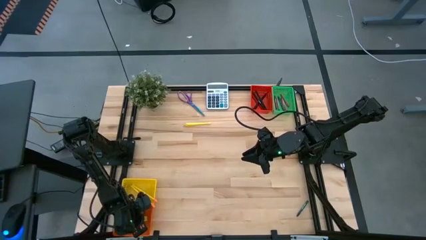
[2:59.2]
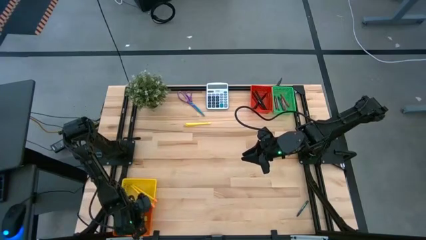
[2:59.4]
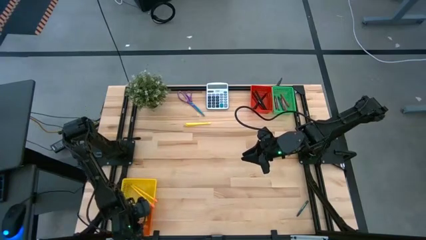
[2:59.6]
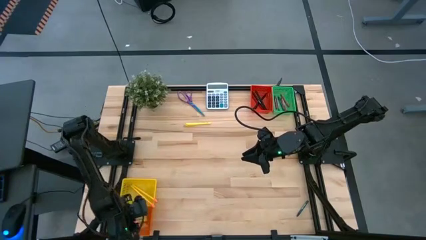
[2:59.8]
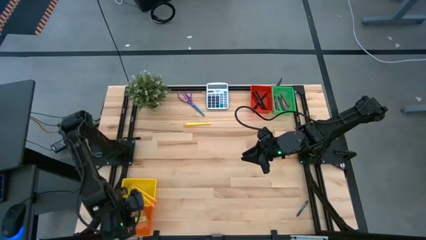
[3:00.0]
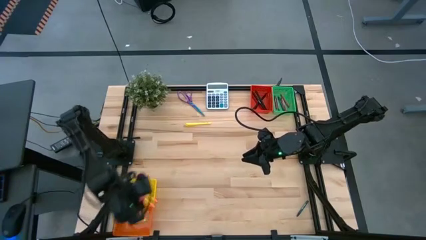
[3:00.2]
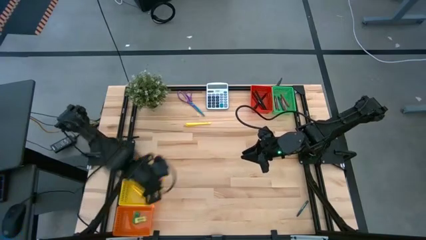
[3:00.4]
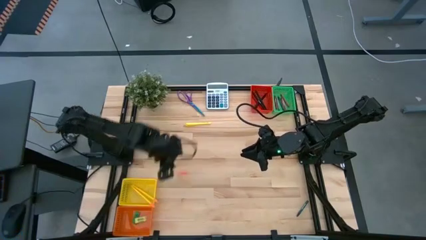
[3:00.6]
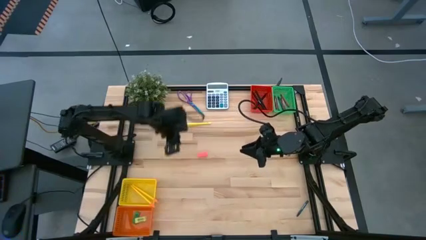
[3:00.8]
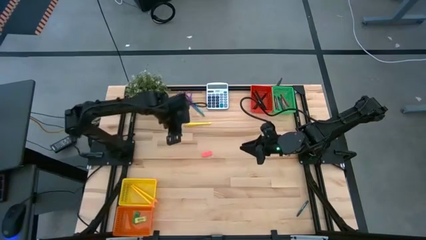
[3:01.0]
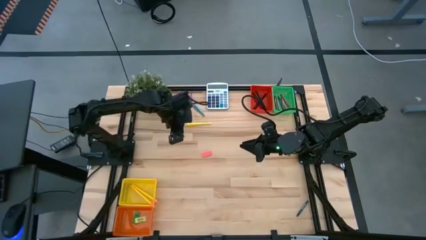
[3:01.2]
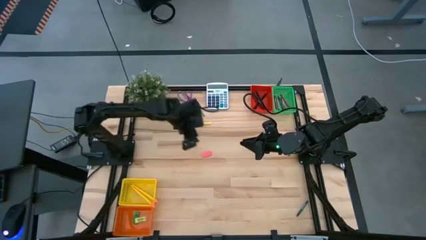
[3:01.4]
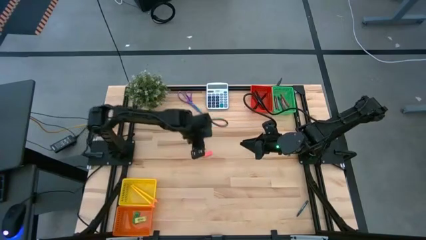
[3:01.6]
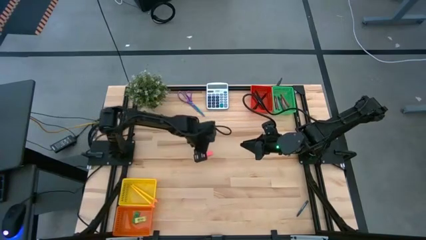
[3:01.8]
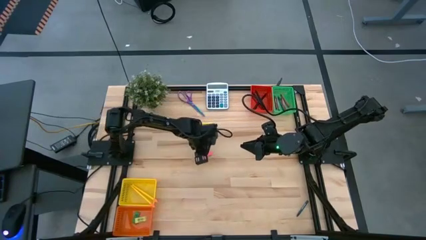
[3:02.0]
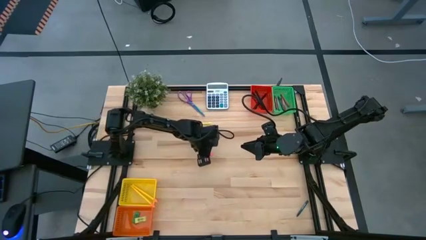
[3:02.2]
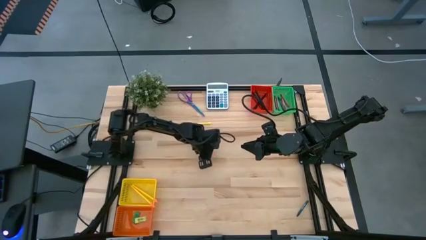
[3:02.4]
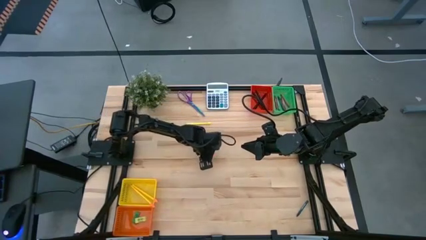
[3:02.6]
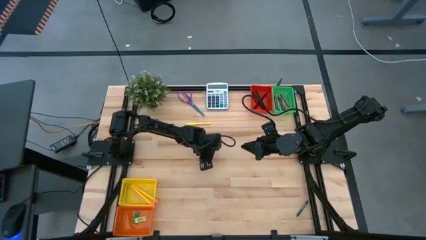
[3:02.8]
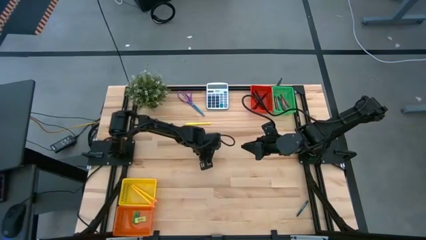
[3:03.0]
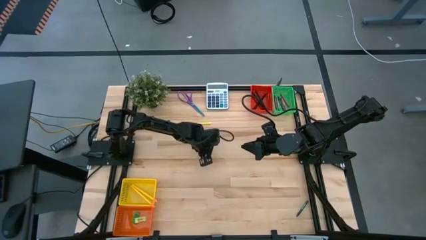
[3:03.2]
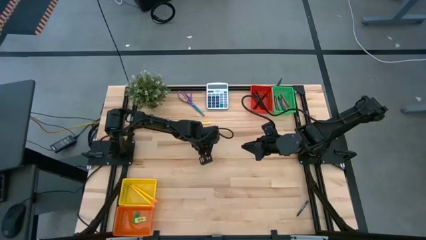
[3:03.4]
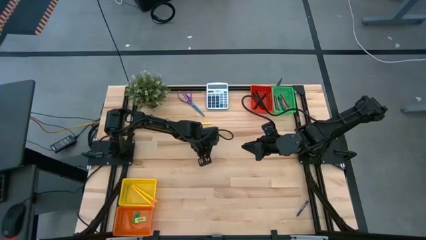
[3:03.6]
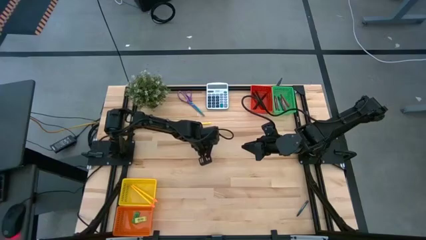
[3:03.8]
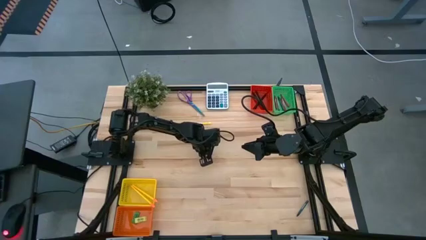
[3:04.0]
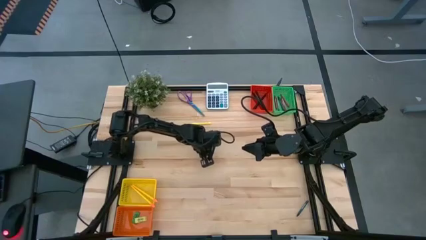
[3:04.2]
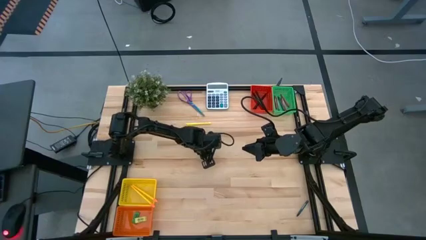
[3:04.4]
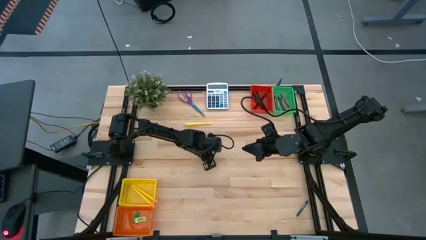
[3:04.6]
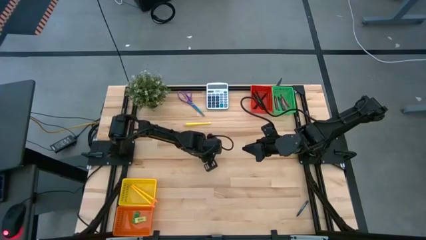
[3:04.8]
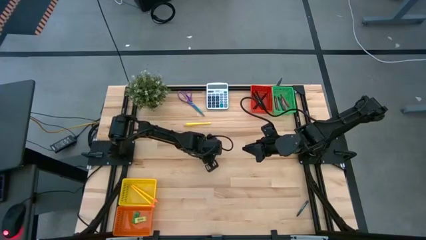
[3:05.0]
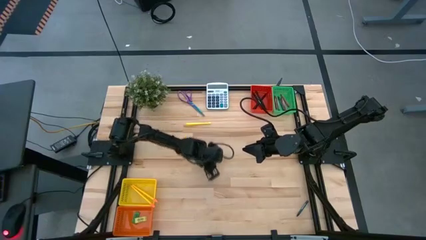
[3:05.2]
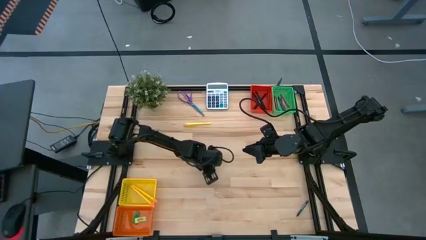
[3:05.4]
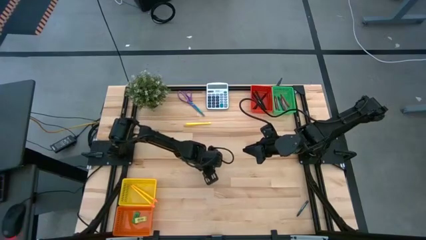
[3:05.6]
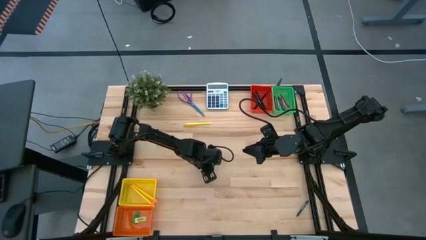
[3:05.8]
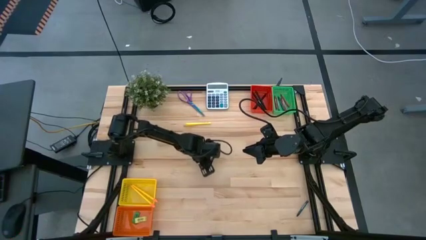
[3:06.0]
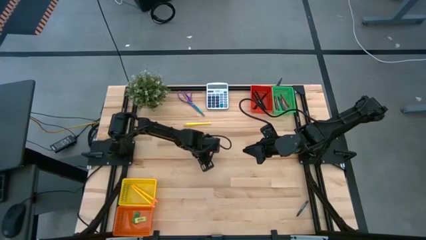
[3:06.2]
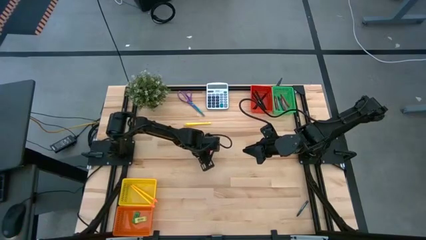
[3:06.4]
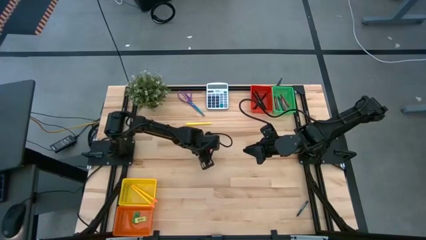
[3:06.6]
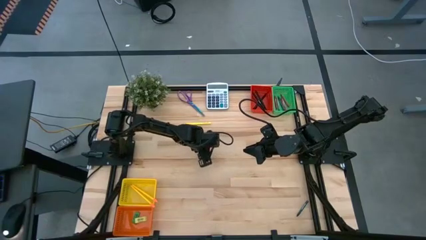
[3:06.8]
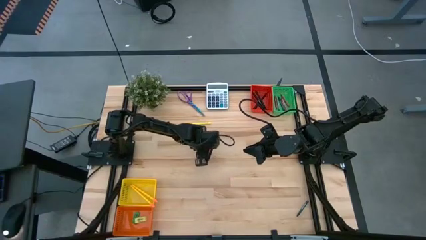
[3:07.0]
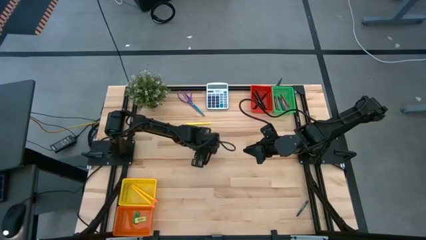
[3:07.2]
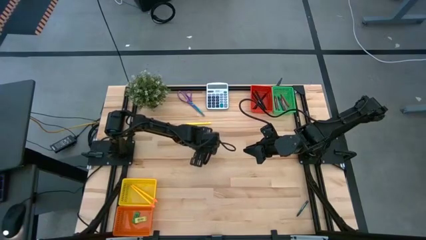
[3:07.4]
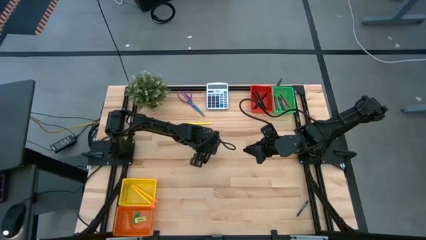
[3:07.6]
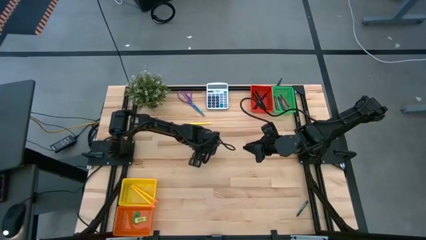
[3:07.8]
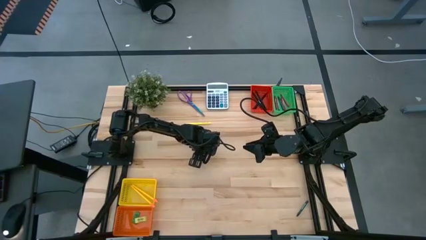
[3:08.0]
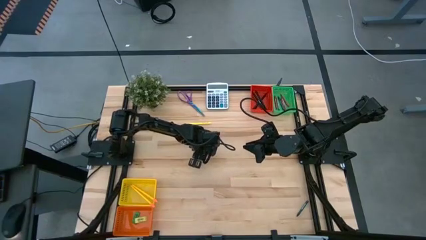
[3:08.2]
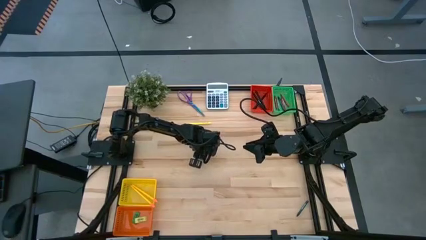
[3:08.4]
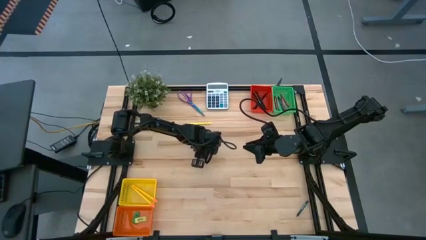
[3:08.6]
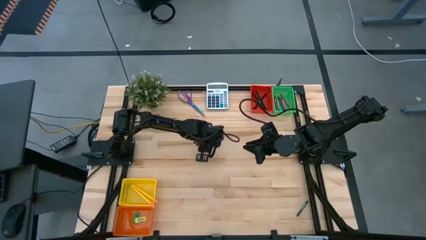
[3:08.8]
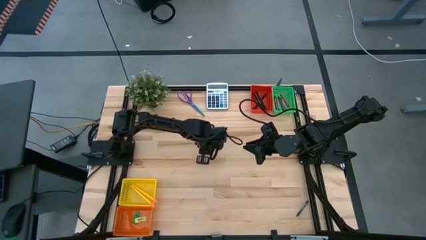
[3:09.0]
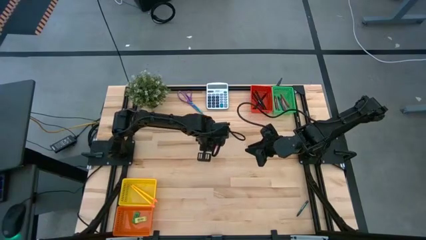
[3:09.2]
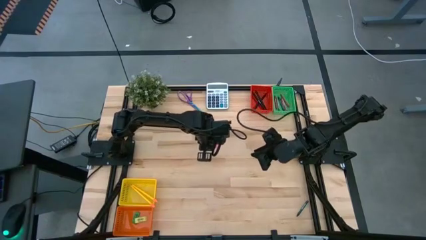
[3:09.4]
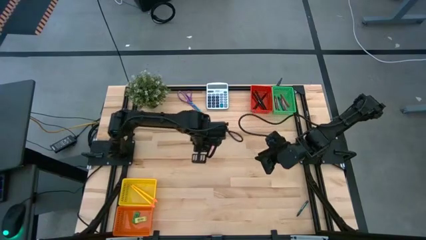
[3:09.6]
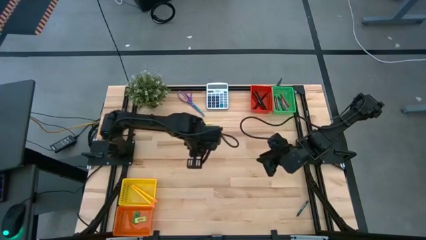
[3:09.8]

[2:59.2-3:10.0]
Task: Sort crayons/erasers/pens/pencils in bins
Put the pink eraser into the orange bin

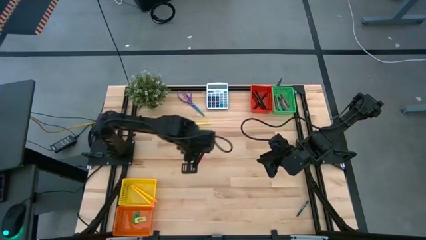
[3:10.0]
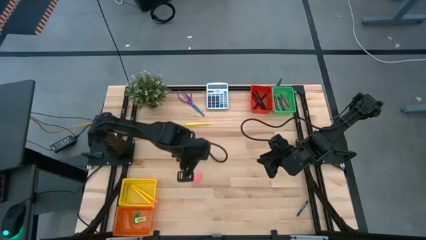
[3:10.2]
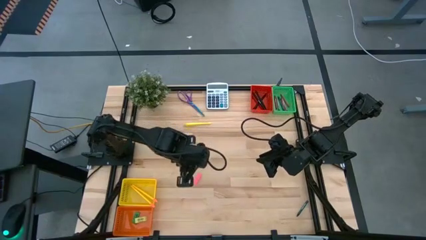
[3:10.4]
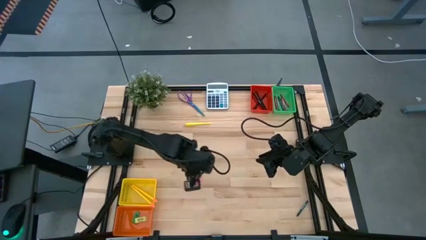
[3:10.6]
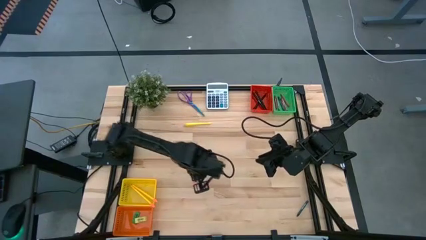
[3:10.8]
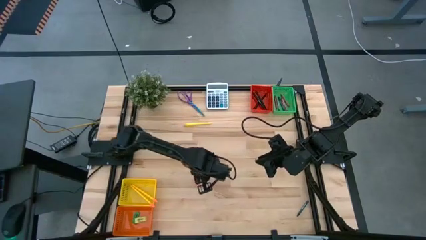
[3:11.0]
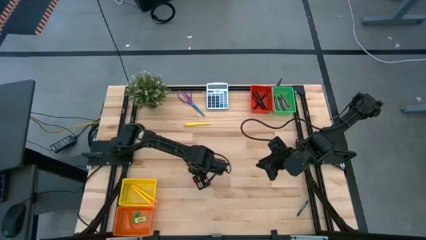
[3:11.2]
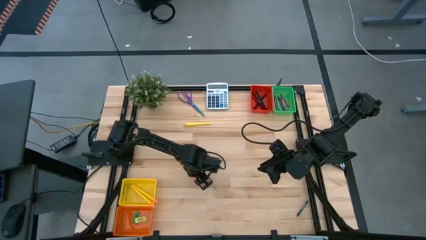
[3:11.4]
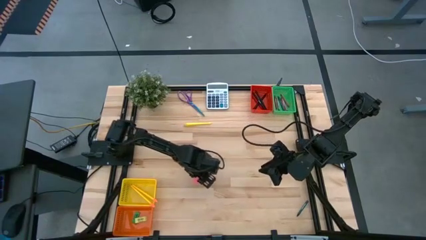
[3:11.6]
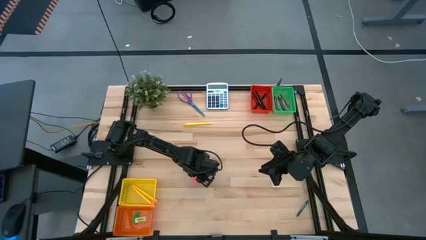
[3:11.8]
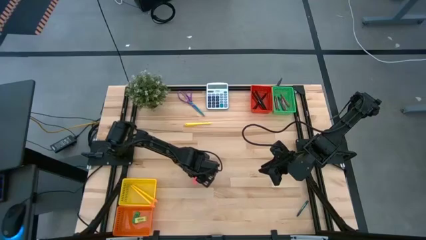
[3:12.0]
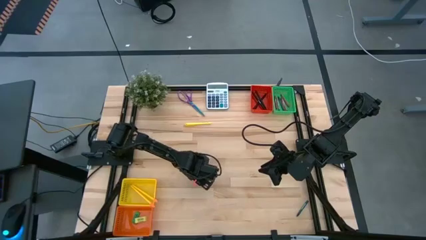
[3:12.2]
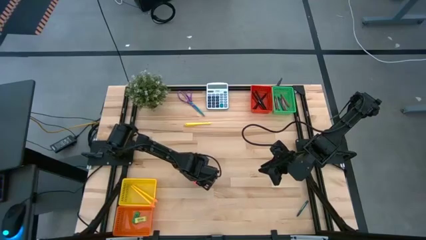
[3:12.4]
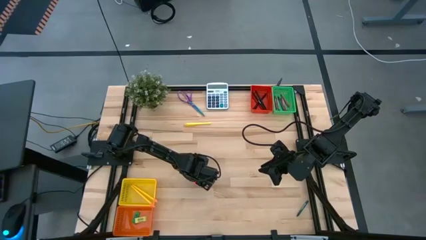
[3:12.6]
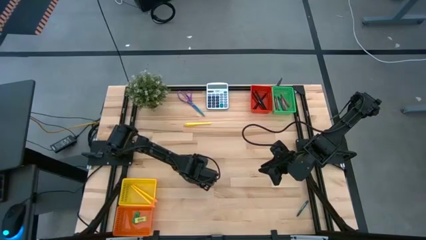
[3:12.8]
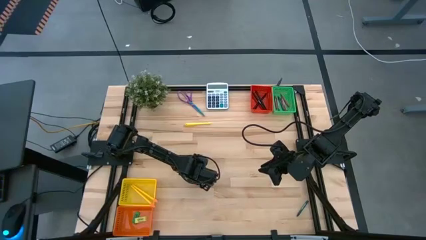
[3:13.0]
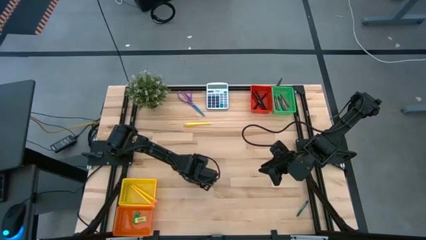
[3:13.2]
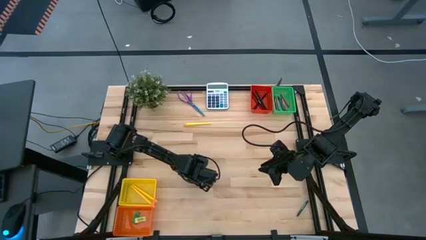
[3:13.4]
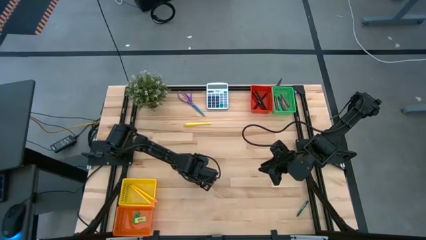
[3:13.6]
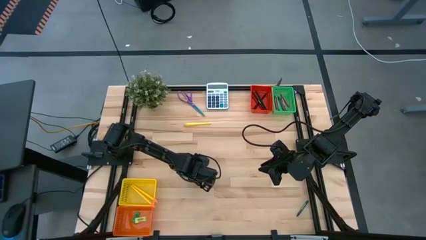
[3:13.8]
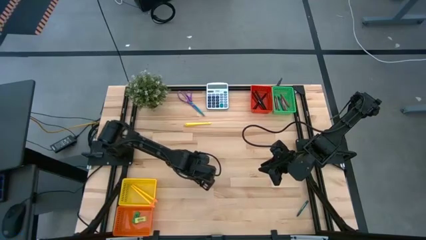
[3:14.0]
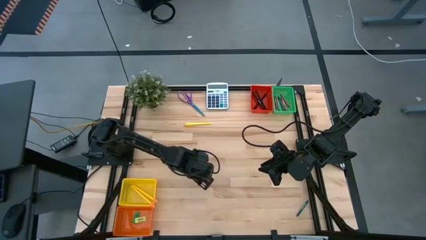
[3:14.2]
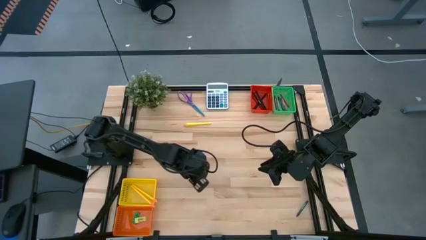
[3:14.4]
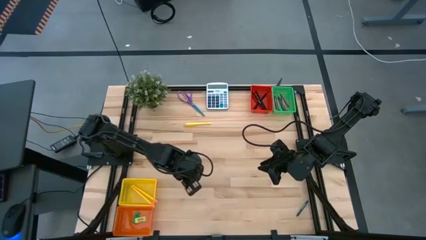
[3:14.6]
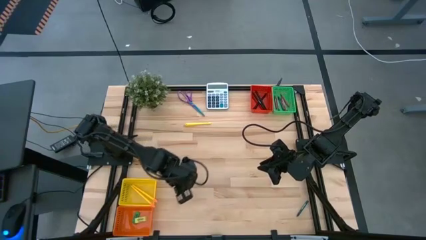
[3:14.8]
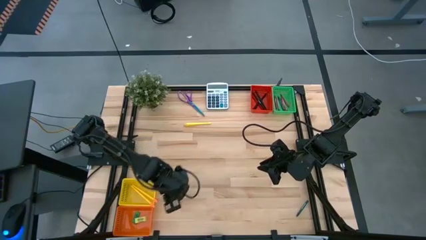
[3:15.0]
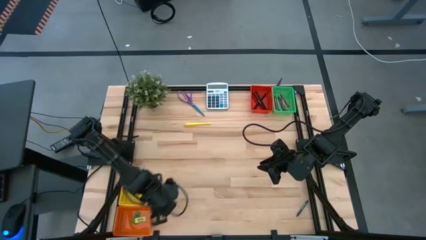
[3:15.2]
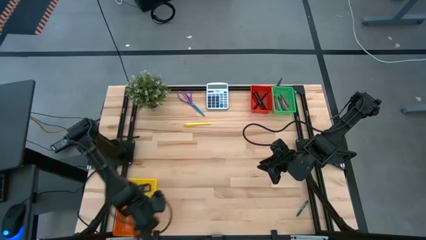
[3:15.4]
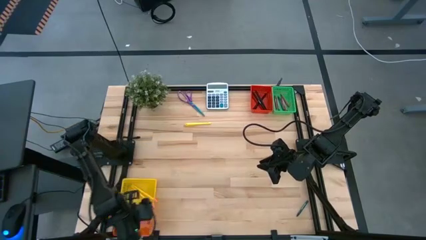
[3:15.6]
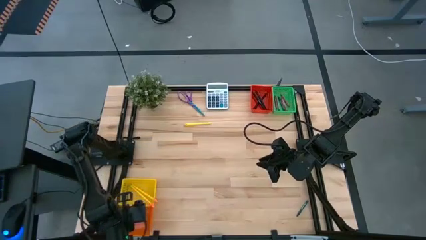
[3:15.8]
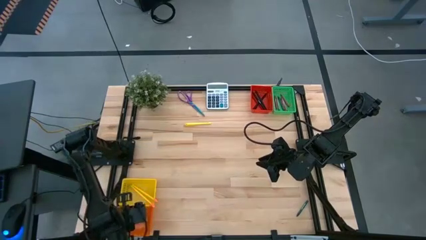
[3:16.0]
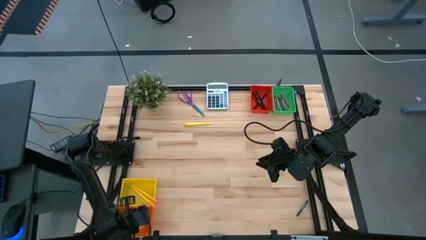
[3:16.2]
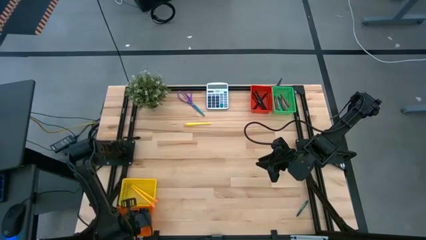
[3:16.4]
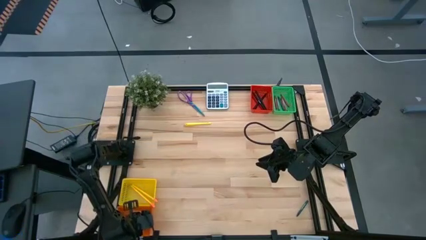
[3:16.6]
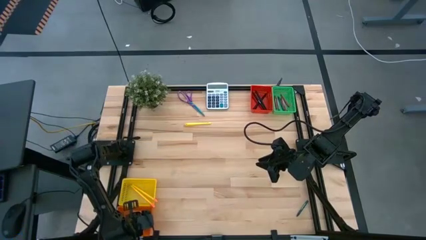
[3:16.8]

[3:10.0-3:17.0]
Put the pink eraser into the orange bin
